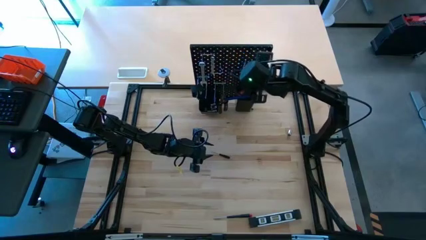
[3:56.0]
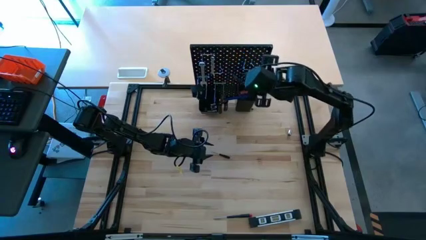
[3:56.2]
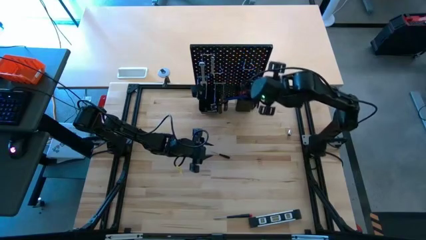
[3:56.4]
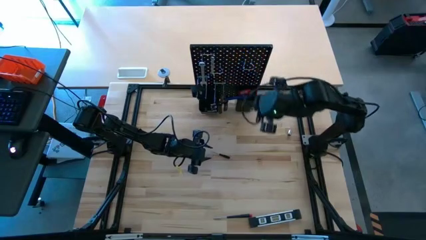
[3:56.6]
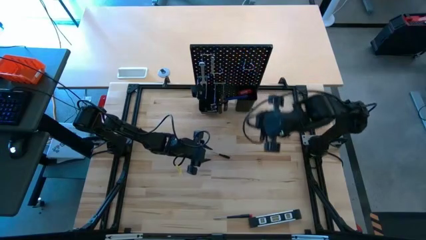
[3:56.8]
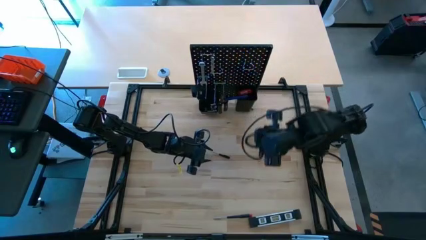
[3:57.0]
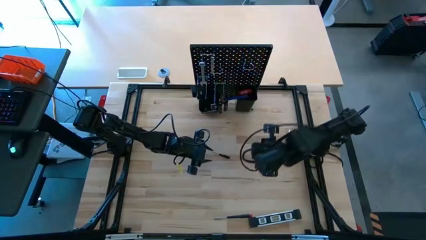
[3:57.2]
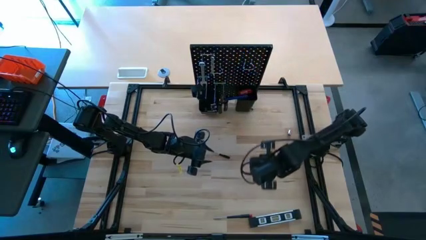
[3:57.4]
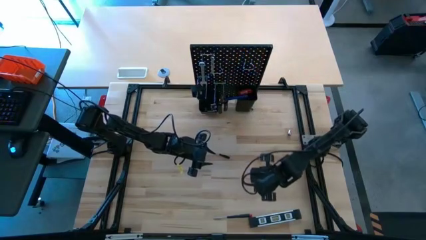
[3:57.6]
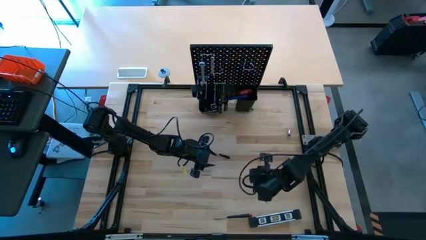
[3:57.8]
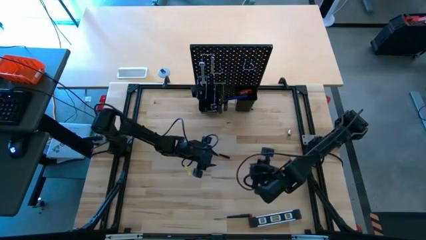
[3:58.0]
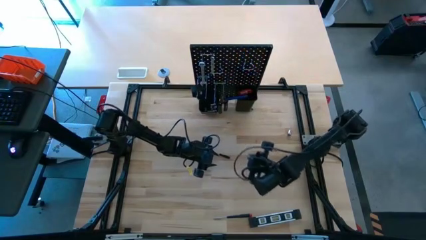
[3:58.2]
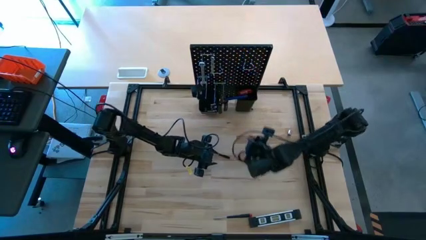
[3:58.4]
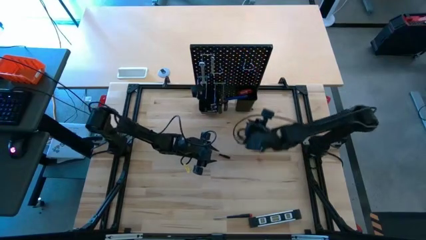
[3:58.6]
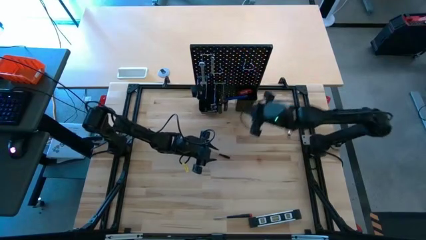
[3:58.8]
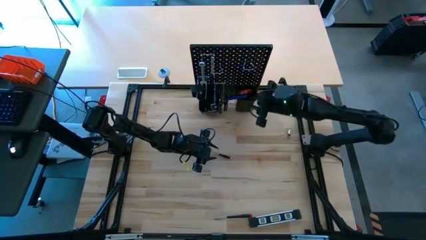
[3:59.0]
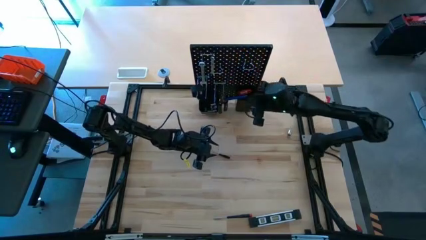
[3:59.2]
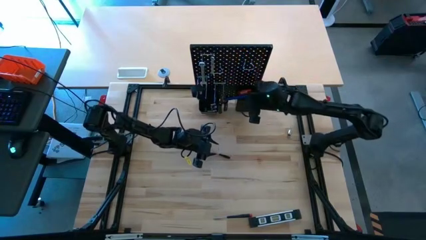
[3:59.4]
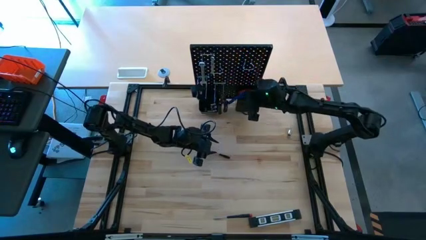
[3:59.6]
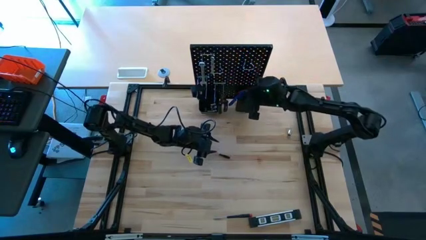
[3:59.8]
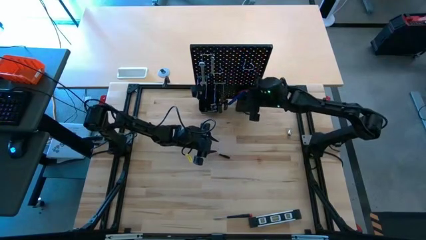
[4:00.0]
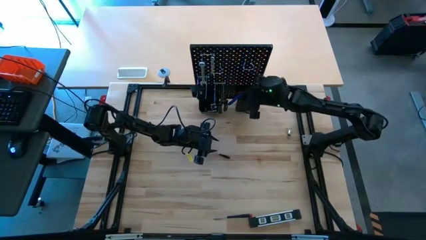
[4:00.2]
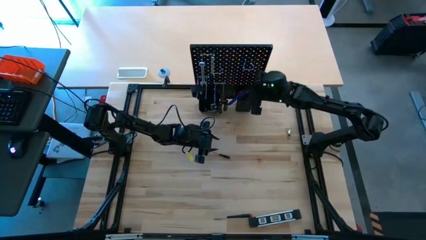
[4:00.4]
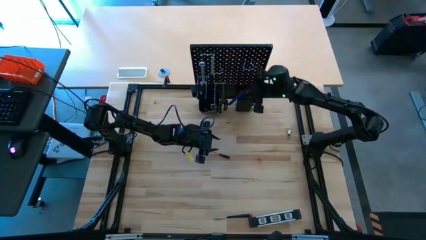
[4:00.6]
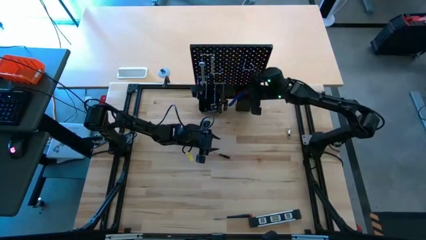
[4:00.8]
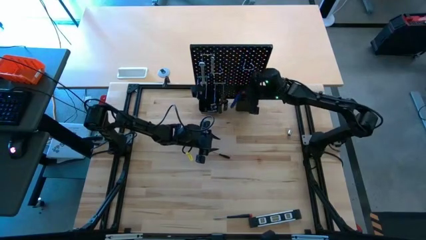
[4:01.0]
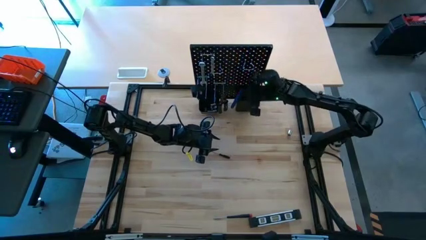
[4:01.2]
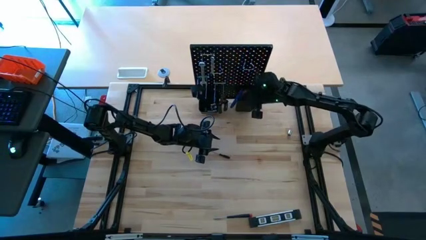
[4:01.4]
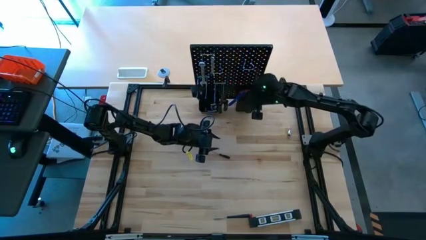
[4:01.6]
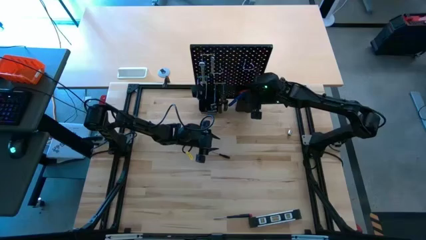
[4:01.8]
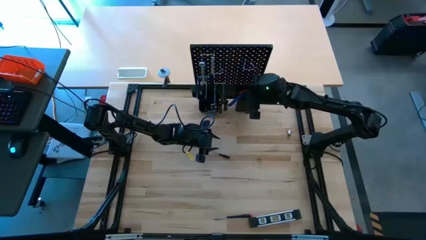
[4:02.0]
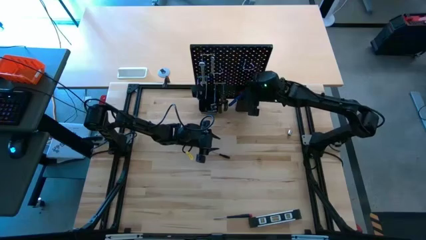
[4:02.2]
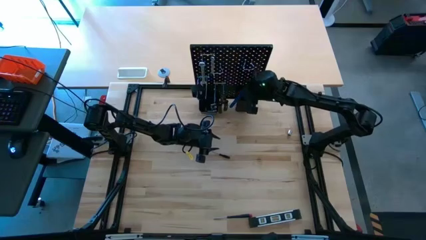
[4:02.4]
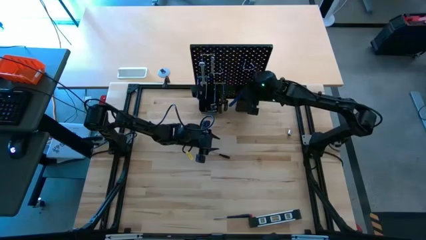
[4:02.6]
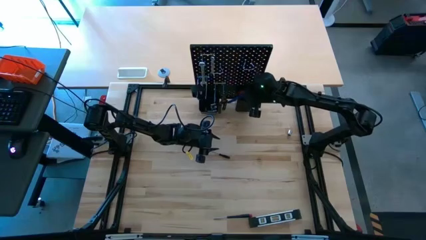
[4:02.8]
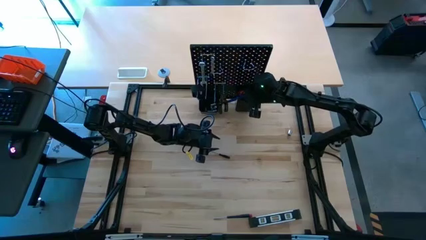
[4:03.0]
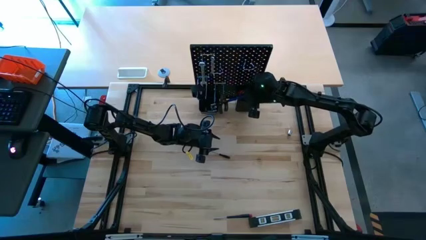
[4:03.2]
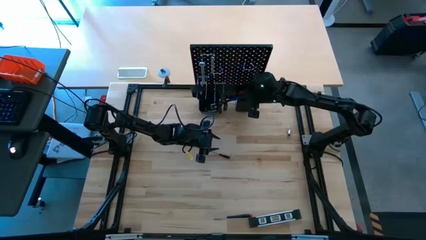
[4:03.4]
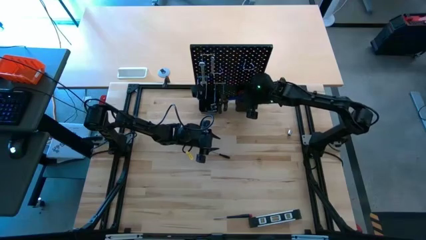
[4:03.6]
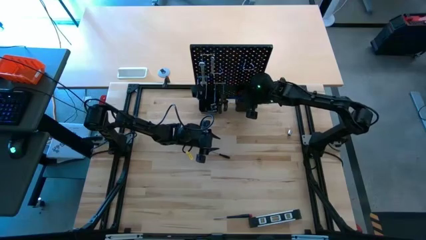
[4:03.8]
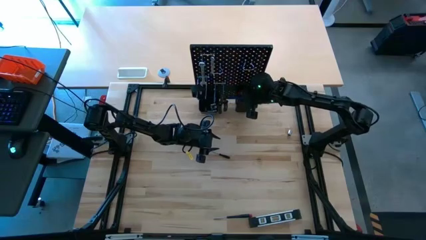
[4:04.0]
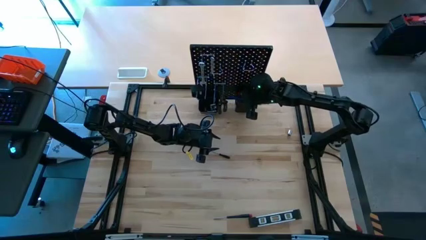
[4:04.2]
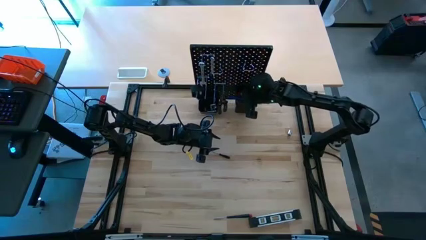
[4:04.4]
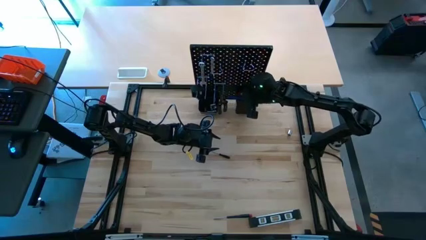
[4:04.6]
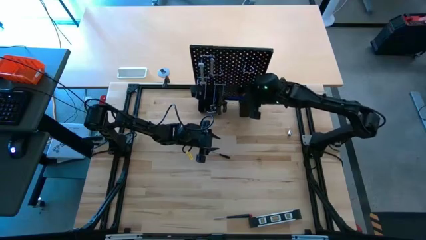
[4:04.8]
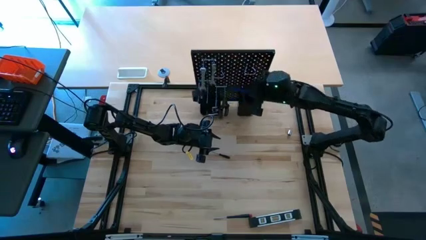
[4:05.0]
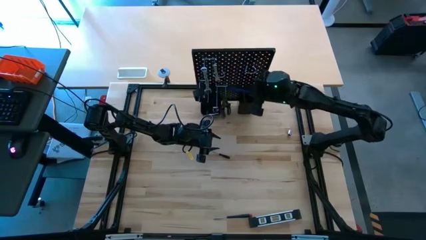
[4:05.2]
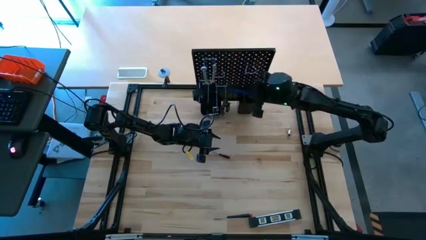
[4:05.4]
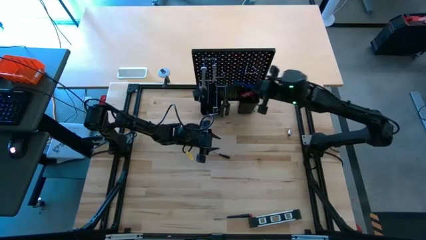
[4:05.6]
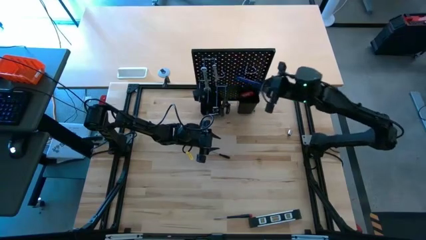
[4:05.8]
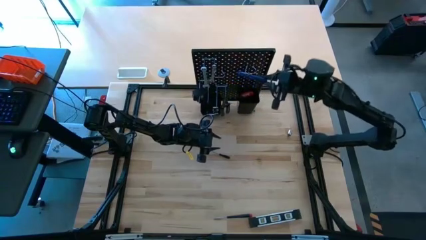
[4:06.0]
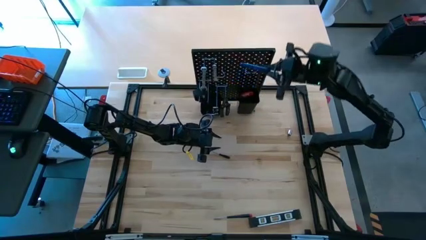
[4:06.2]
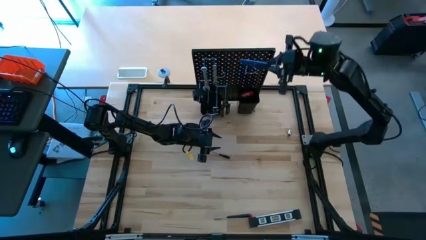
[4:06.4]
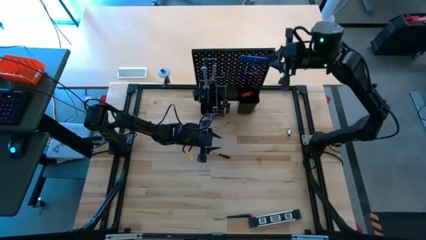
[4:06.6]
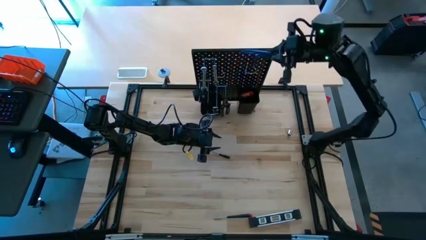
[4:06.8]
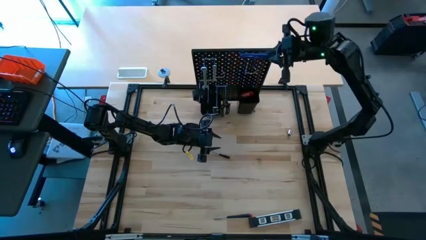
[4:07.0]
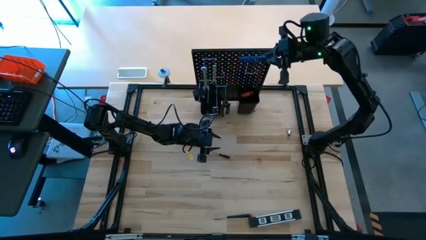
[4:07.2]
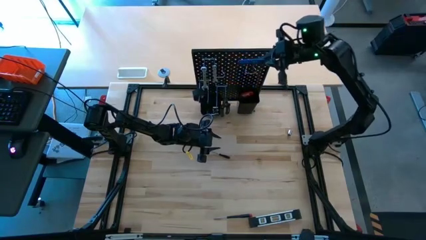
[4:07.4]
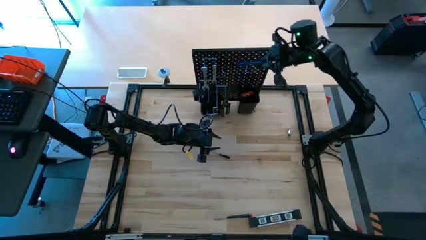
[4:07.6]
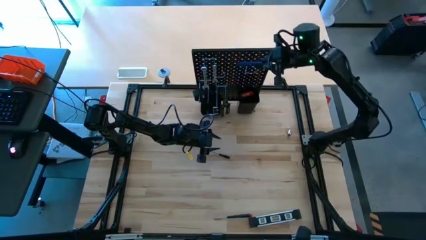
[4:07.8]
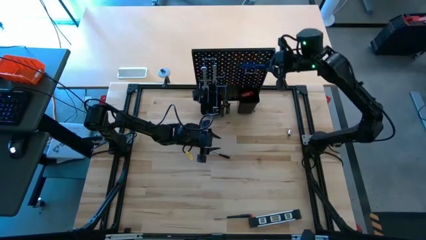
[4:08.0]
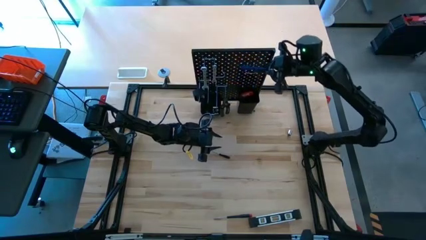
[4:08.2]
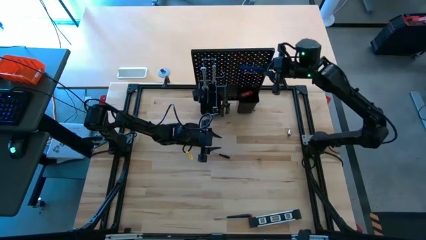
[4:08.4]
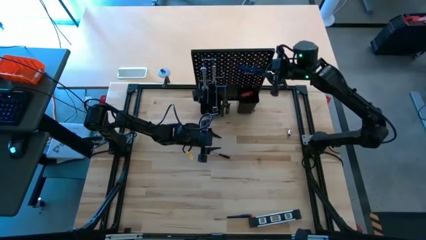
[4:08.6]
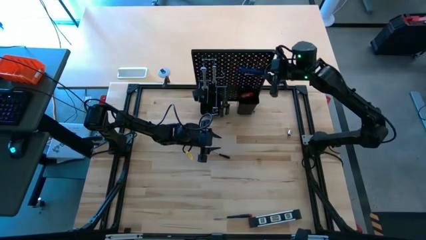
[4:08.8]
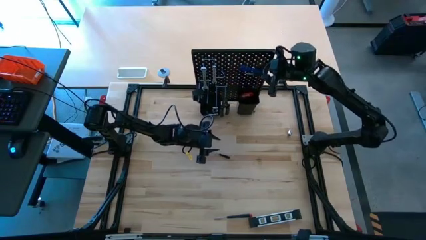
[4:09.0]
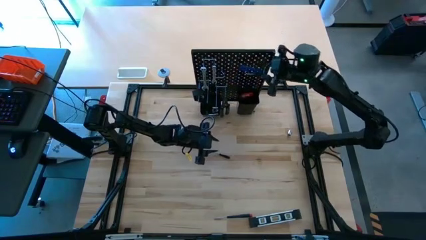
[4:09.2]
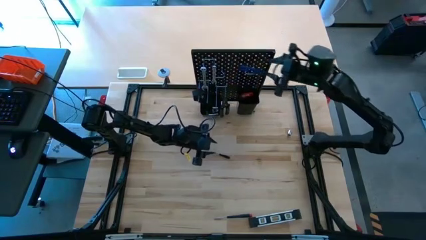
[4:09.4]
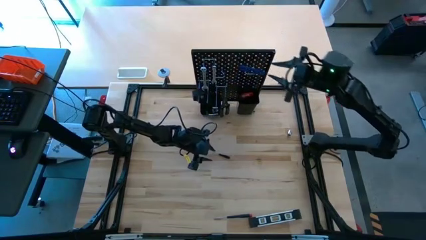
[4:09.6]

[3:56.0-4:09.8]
Task: Hang tools onto peg board
Hang the pick tool on the pegboard

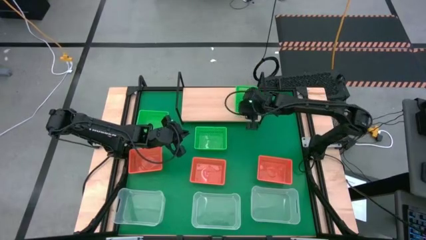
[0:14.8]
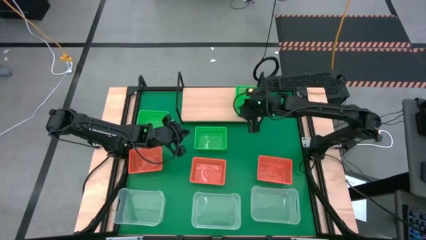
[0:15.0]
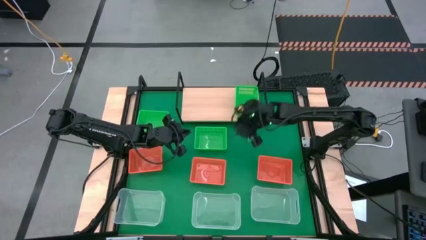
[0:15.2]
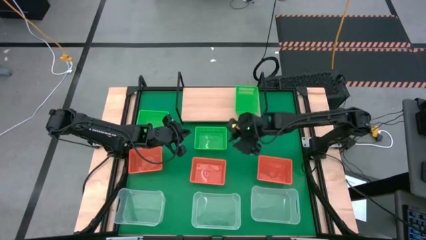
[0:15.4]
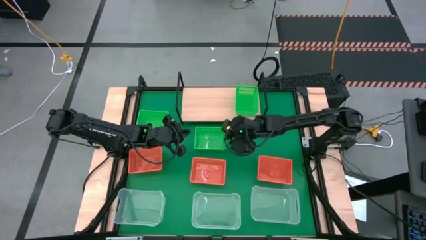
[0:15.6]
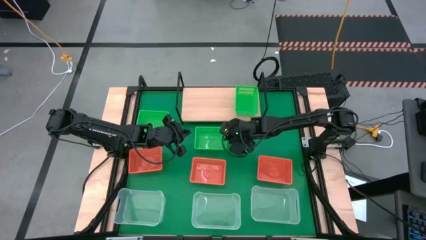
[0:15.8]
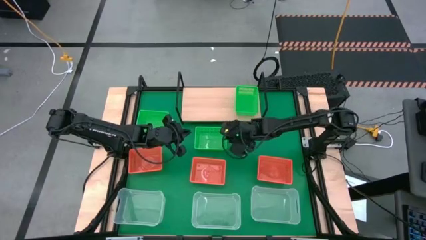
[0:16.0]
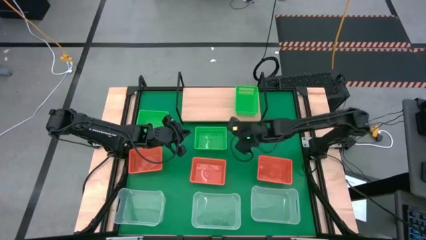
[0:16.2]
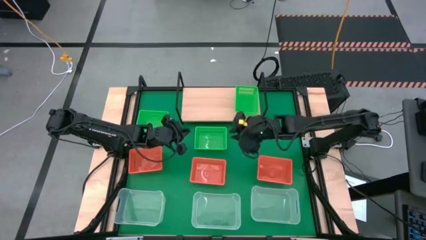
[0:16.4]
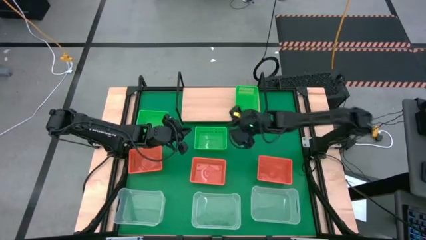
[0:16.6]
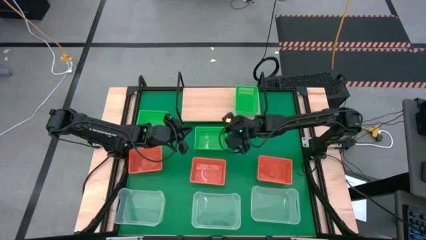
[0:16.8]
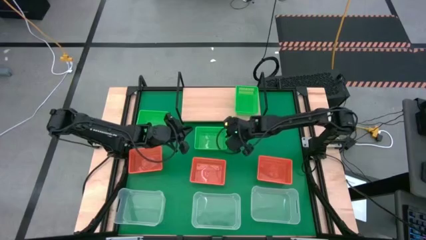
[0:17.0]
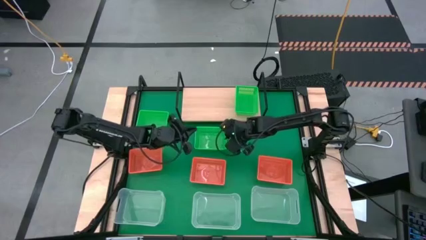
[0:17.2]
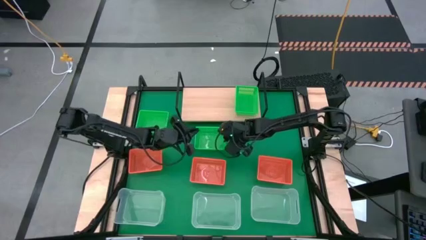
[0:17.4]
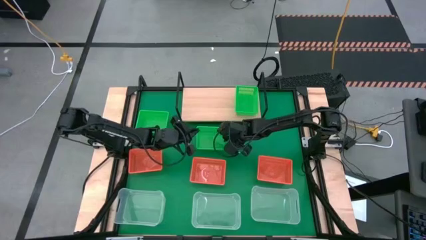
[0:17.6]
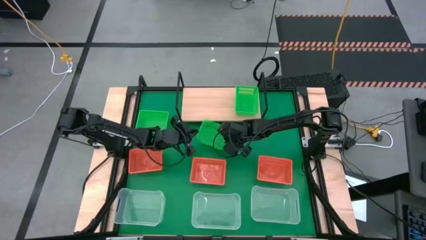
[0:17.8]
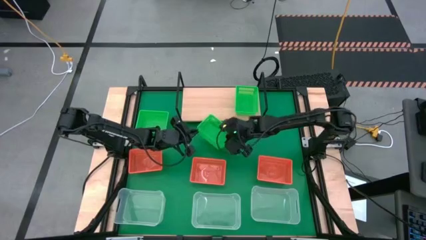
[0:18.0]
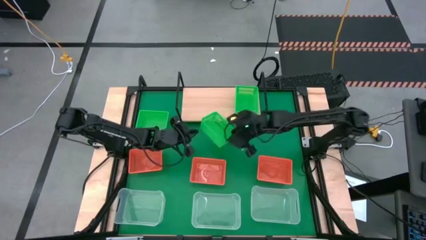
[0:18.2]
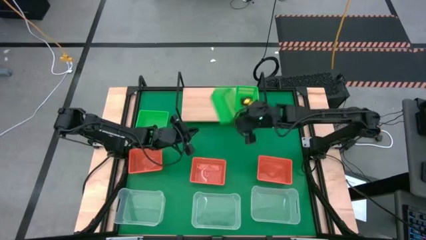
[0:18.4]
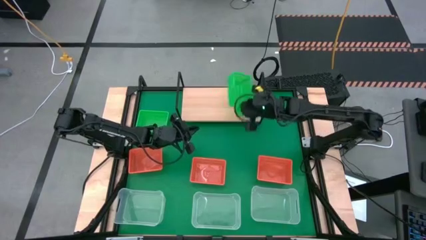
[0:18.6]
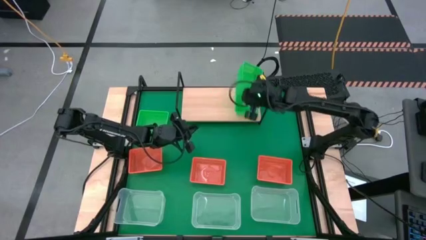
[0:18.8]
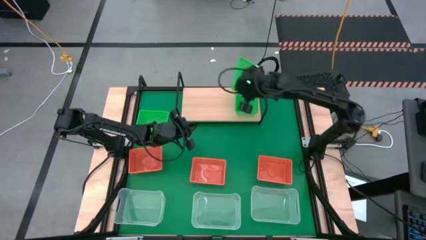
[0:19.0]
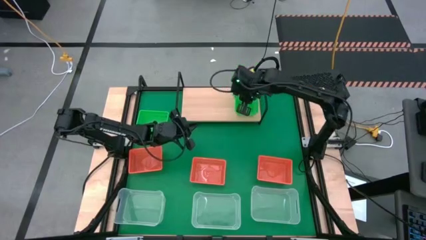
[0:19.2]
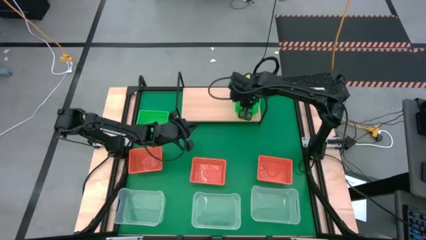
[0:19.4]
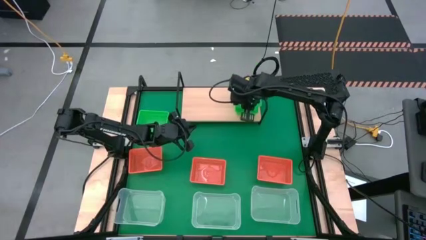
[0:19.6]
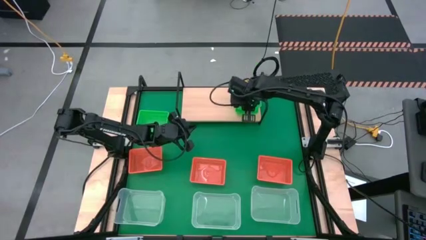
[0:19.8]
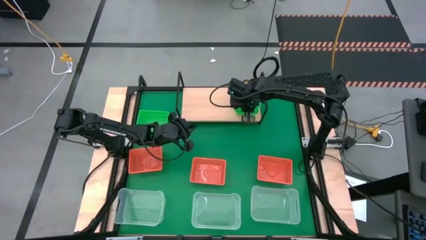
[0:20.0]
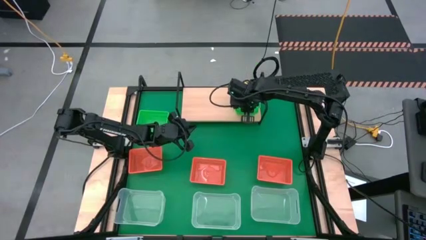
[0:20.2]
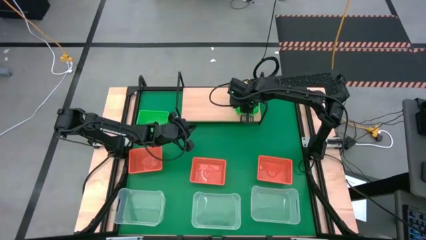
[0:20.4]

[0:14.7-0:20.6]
Task: Stack baskets on shelf by color
Stack the right green bin on the green bin on the shelf
